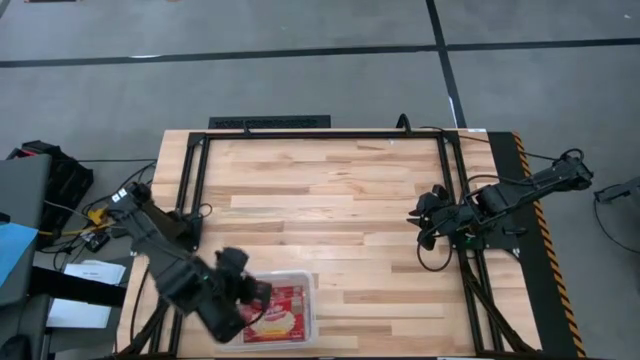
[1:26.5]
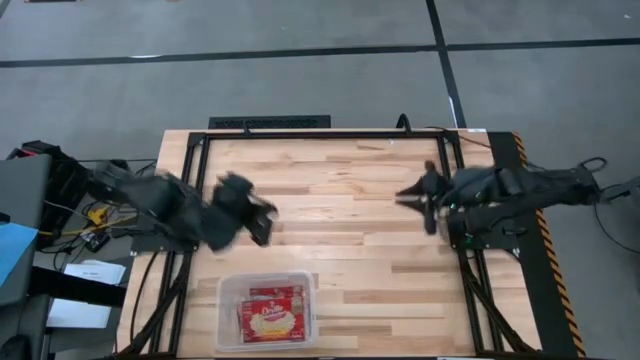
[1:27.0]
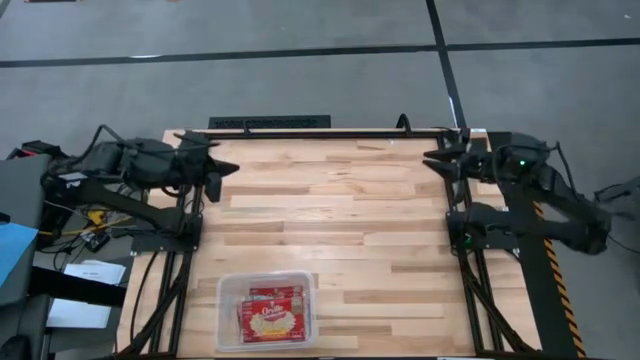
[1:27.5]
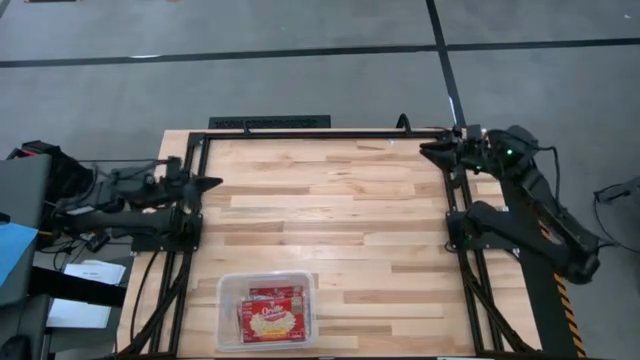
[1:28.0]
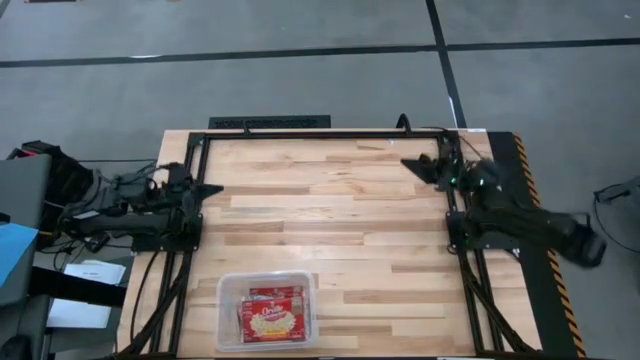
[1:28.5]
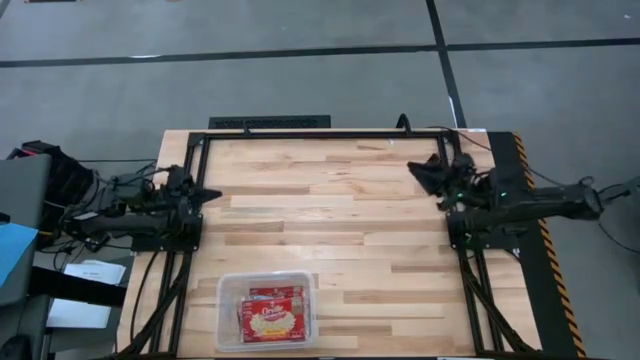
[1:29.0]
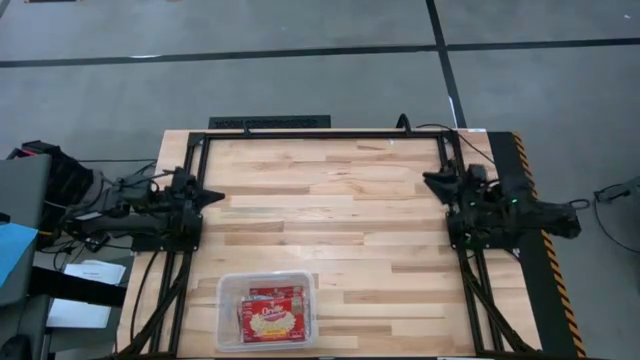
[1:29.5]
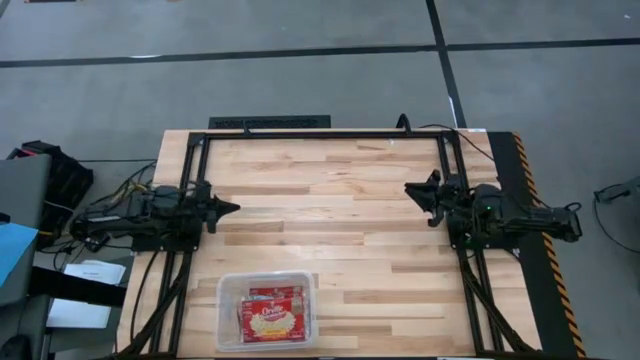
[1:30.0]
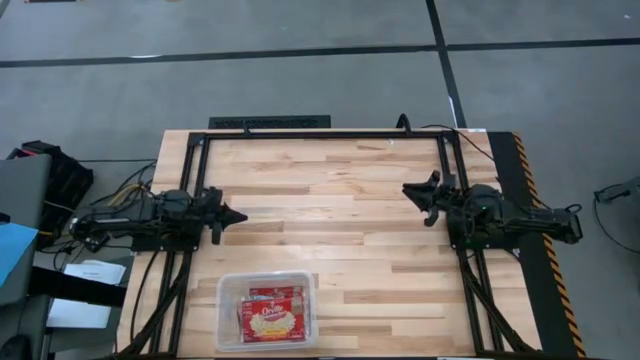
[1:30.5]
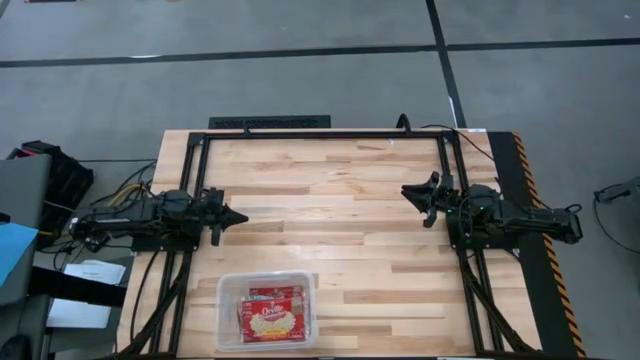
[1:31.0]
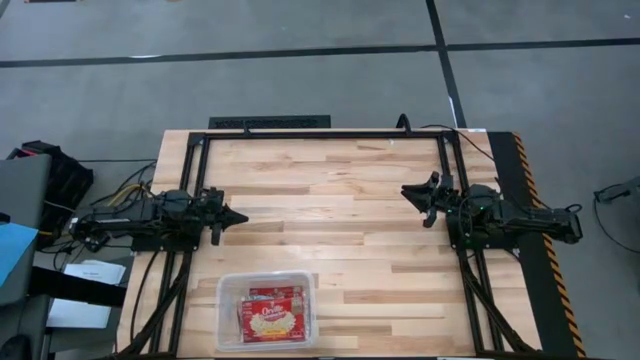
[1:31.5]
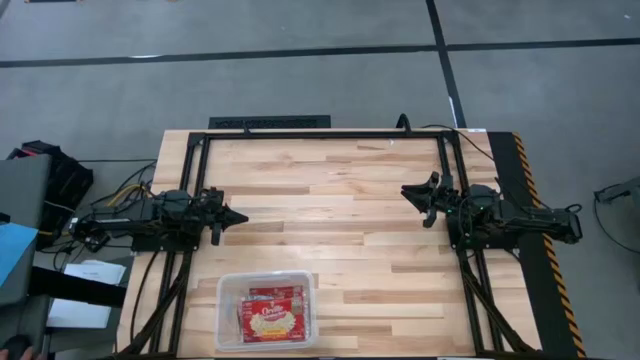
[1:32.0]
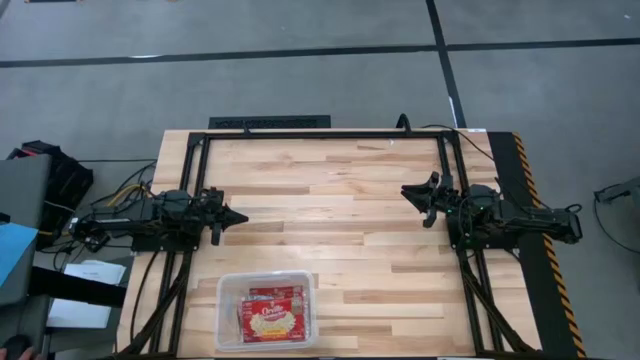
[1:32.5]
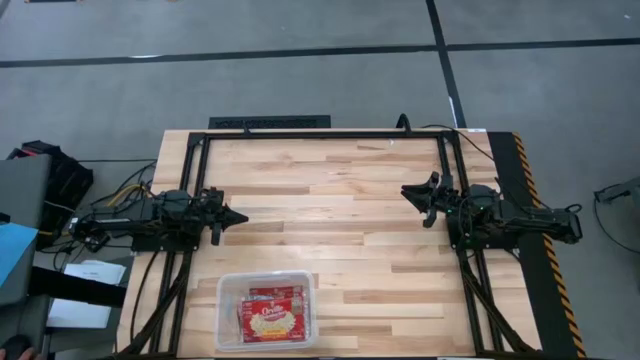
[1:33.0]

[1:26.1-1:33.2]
Task: Sort popcorn bags into baskets
Return to Home Position

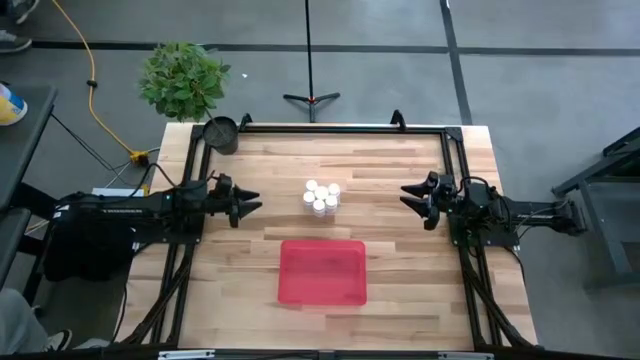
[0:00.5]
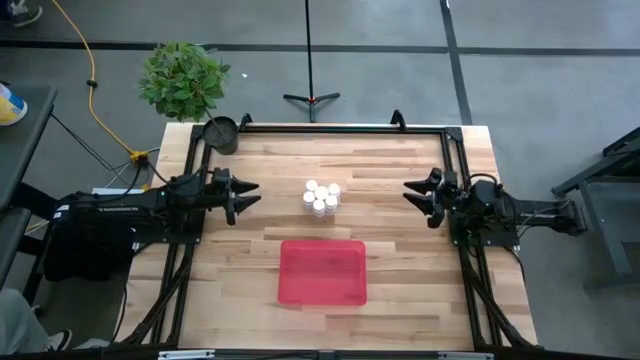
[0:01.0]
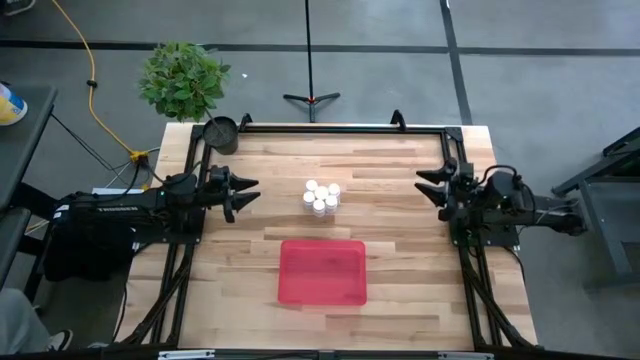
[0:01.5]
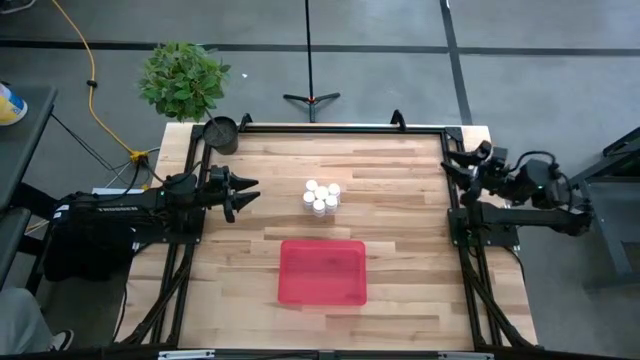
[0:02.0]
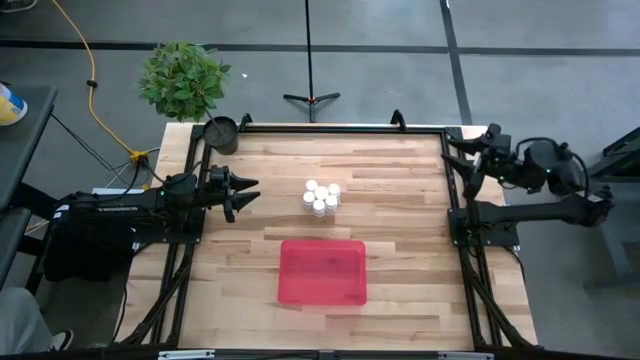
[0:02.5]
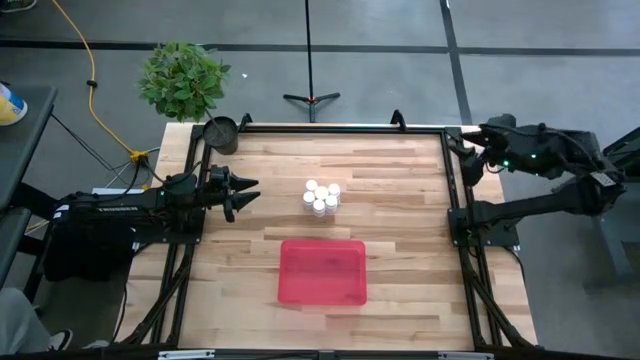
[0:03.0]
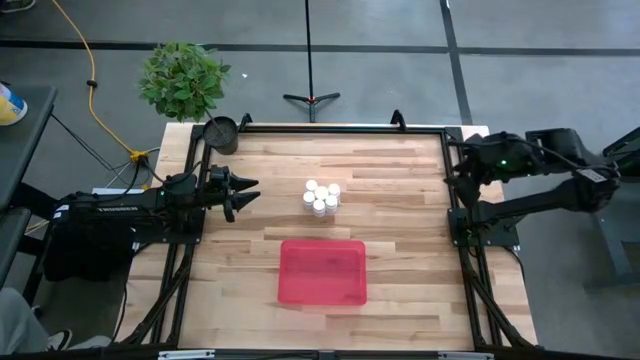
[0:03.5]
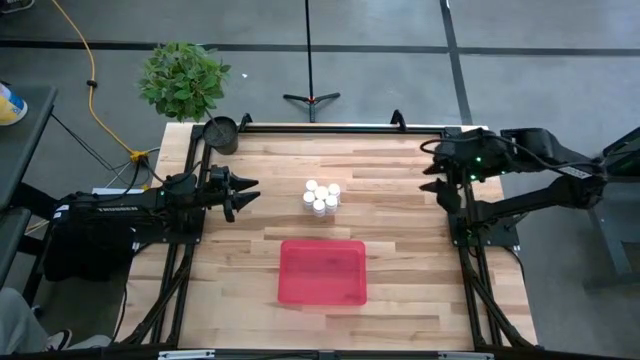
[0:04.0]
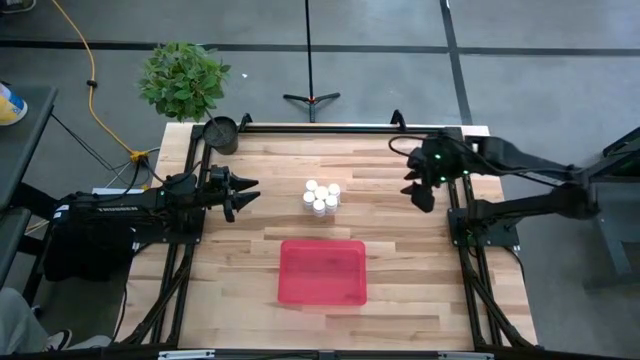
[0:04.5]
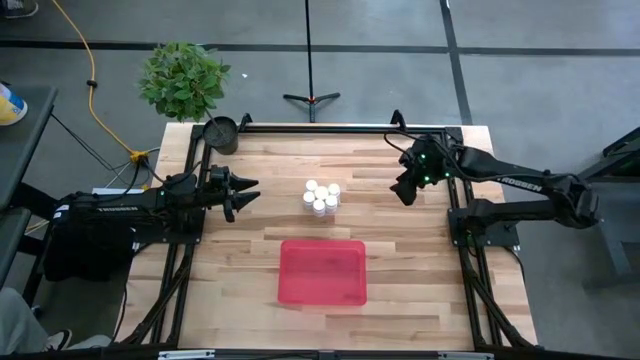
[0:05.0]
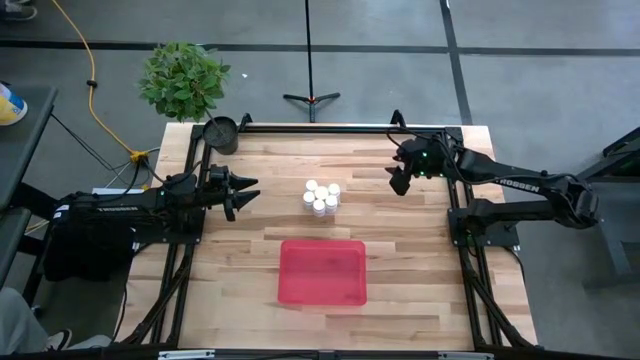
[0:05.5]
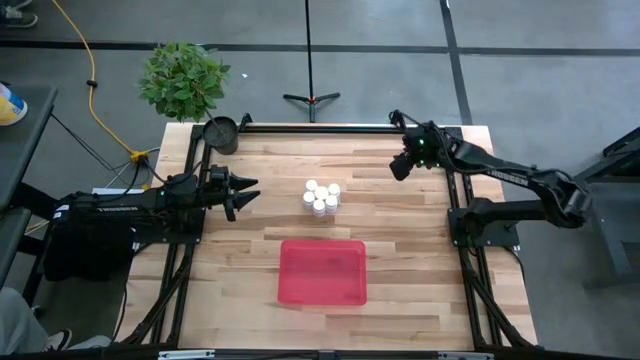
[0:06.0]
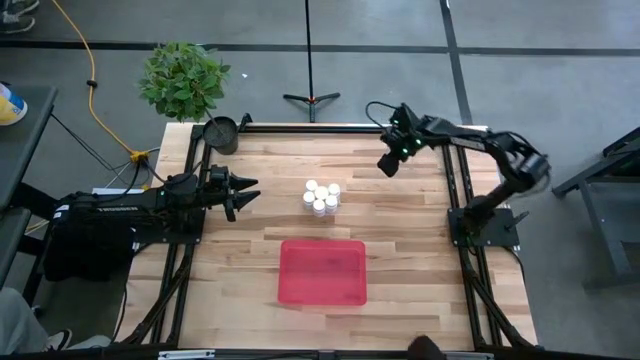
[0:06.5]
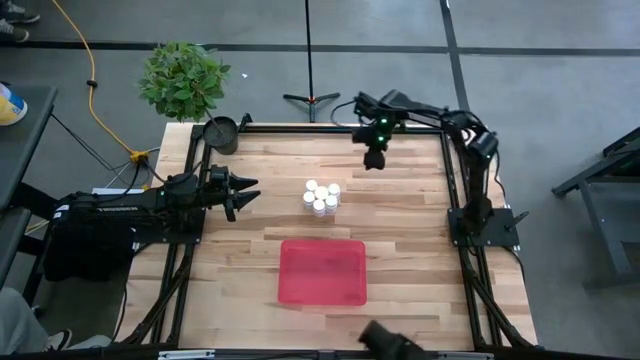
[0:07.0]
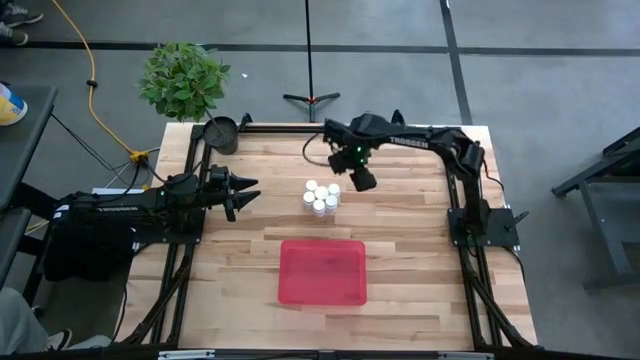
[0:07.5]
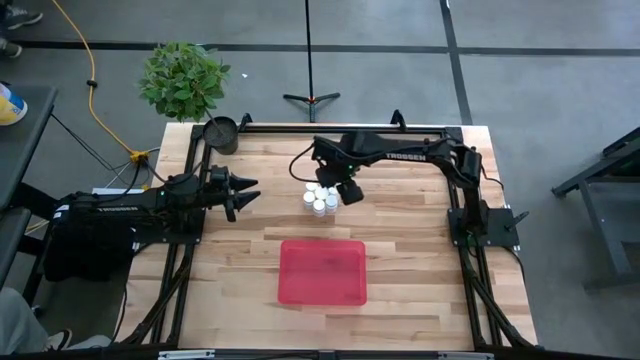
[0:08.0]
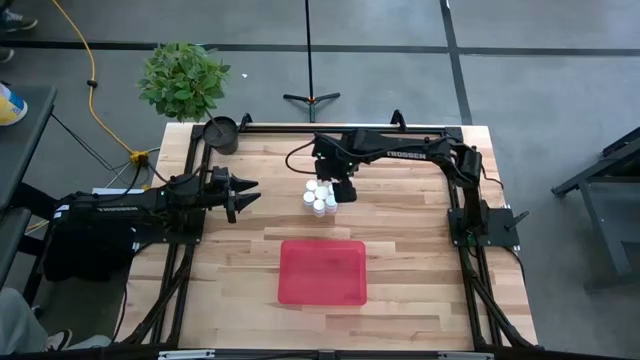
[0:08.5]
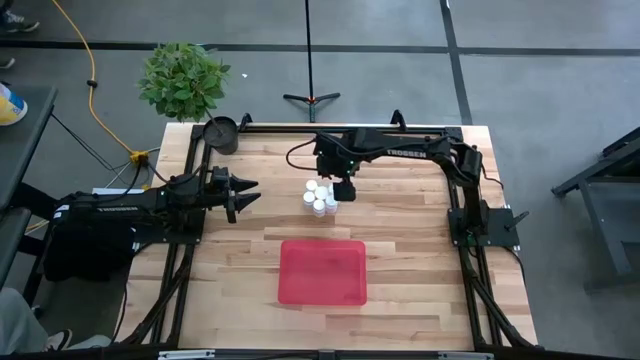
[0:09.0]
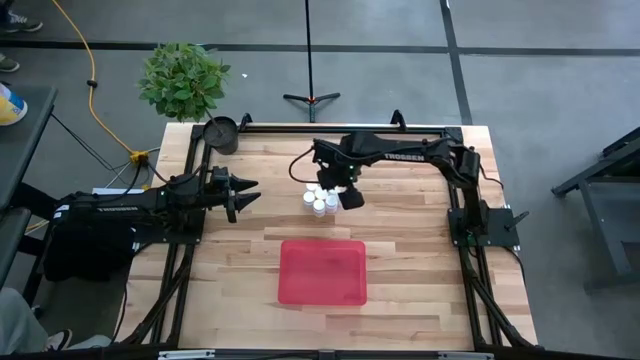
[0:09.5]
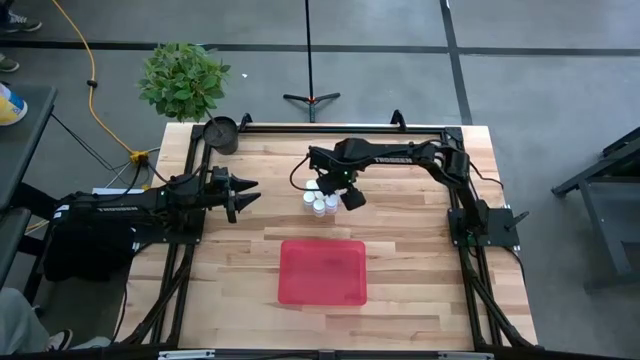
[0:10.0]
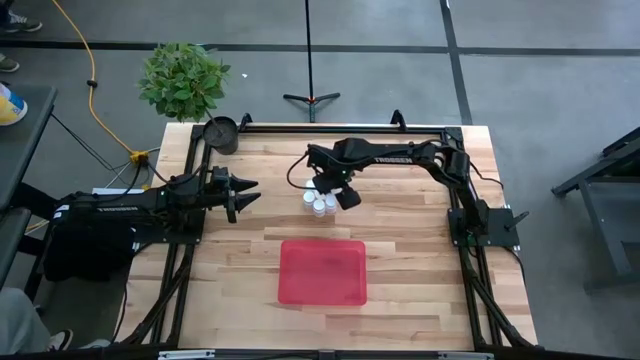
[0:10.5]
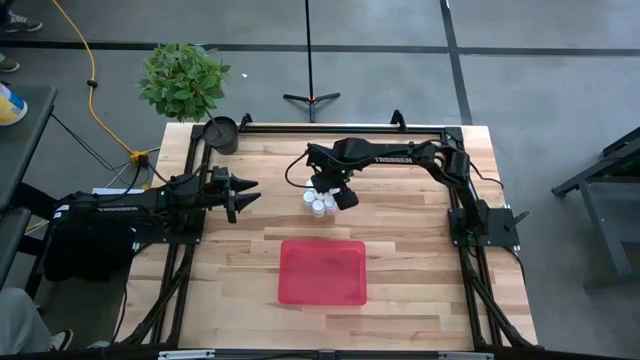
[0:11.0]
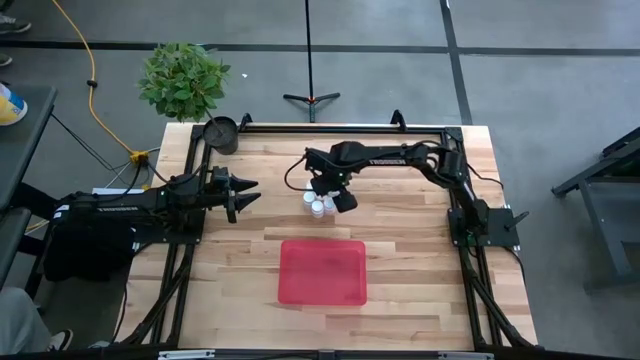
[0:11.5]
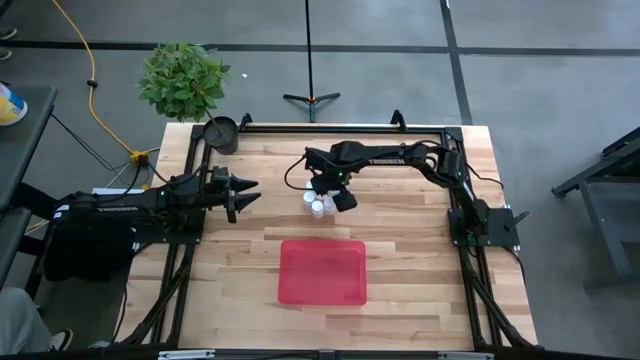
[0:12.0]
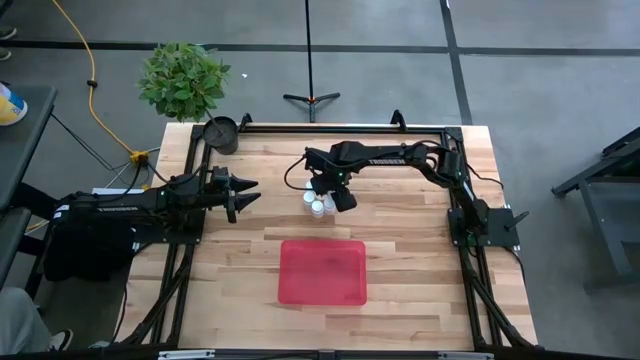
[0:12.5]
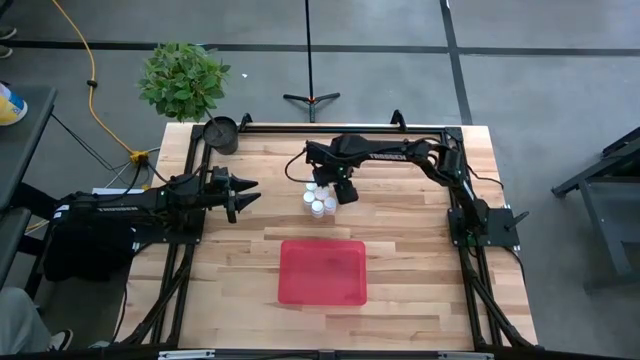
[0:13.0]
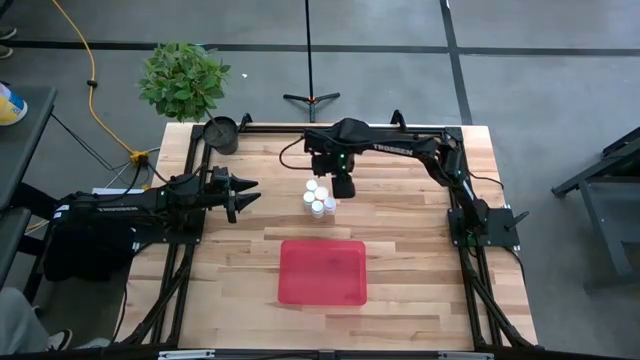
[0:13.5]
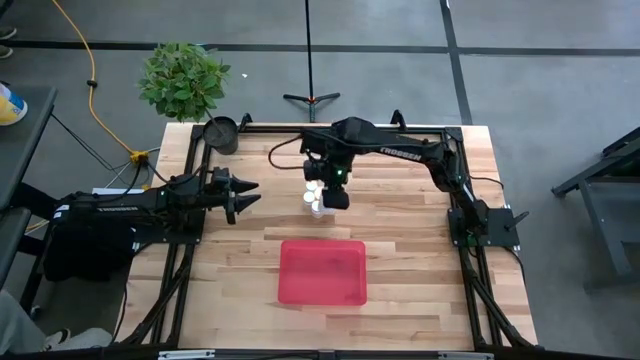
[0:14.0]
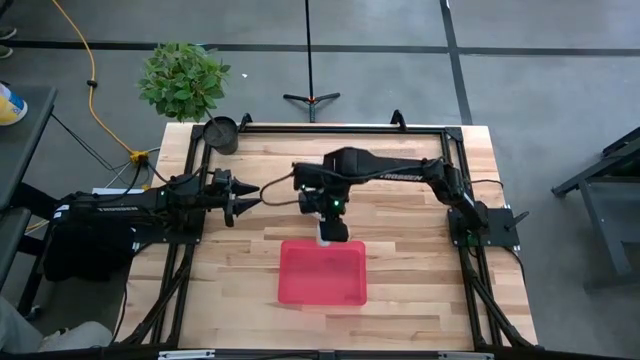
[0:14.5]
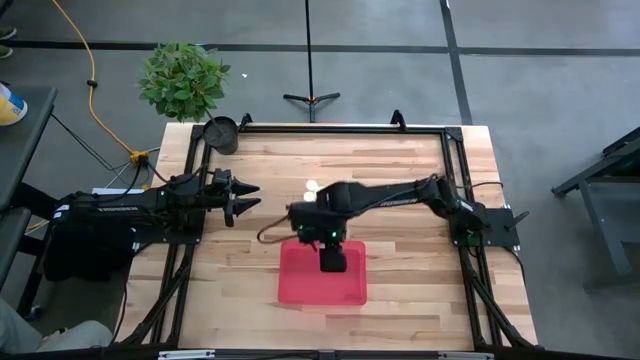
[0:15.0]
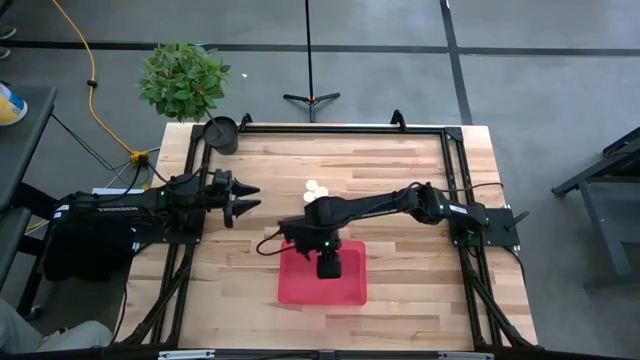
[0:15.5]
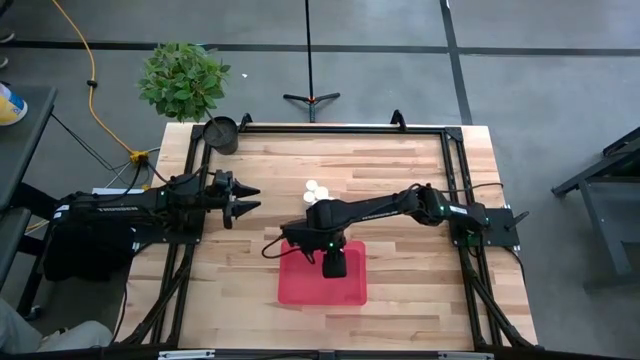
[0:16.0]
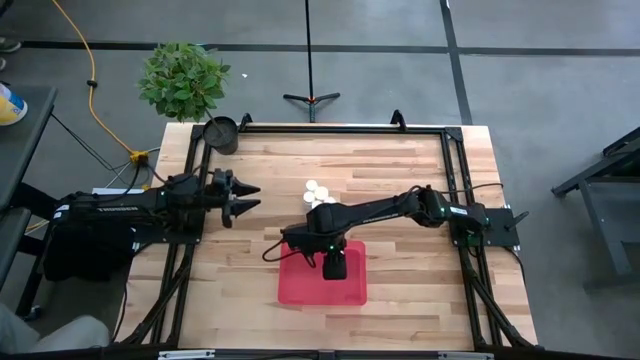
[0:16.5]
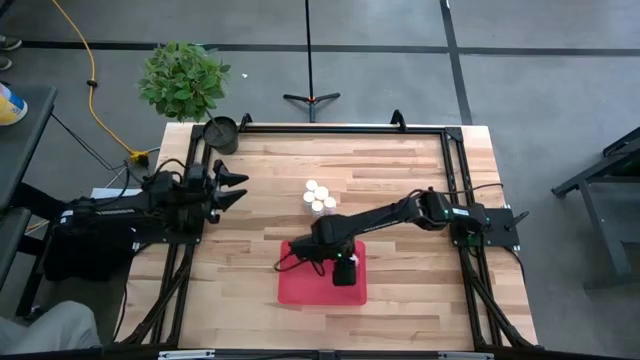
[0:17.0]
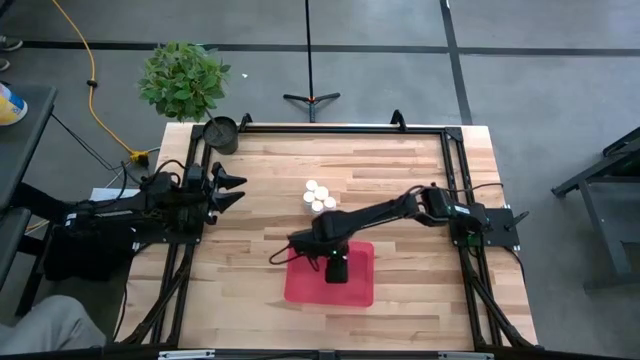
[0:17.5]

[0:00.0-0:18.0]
Task: Pick and place pill bottles into a basket
Put the white pill bottle into the bin
